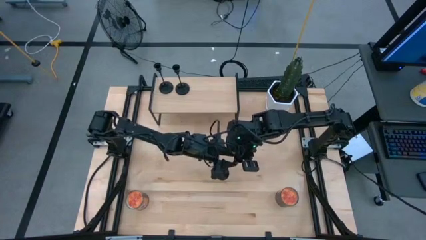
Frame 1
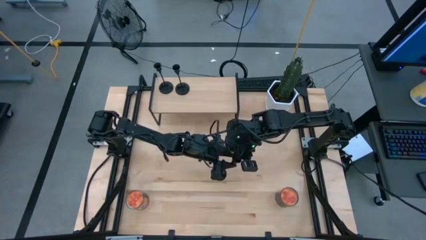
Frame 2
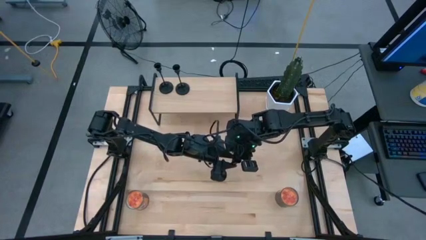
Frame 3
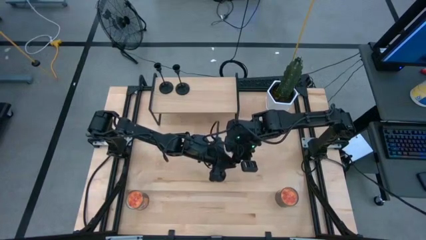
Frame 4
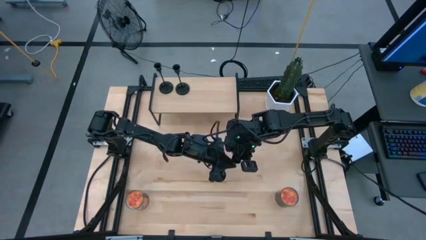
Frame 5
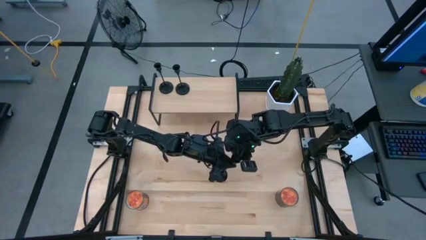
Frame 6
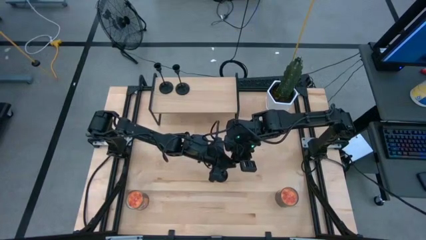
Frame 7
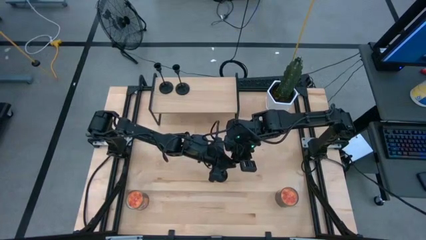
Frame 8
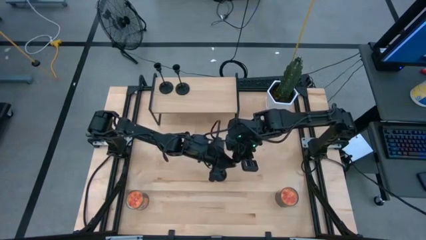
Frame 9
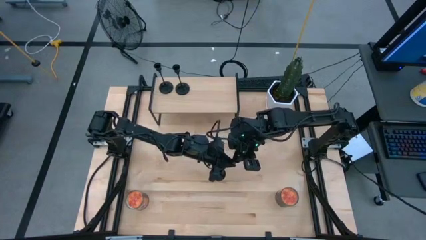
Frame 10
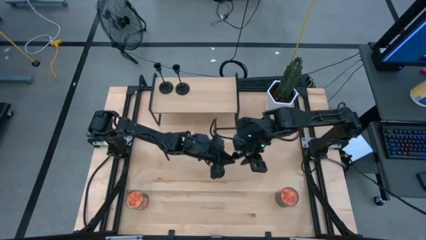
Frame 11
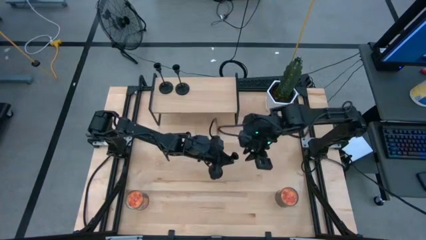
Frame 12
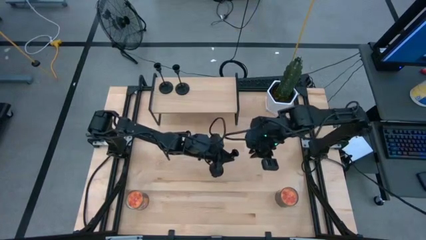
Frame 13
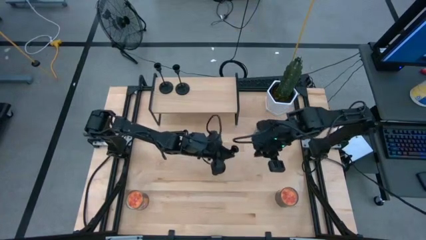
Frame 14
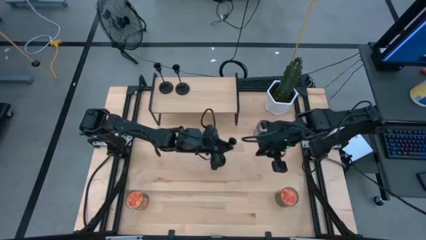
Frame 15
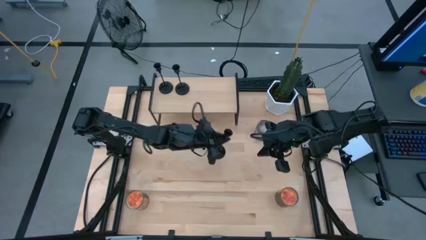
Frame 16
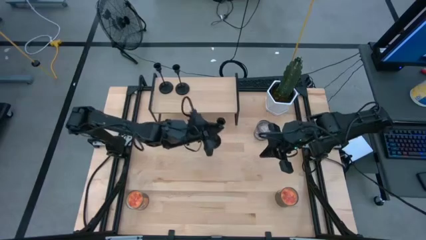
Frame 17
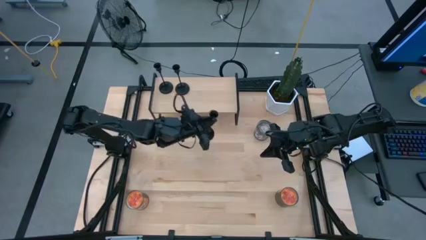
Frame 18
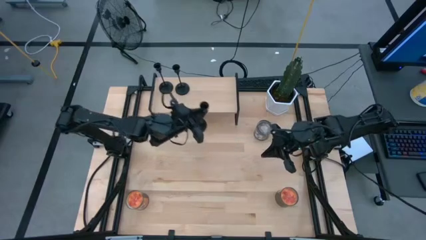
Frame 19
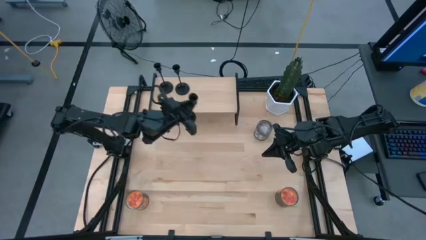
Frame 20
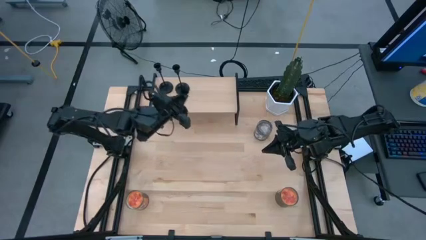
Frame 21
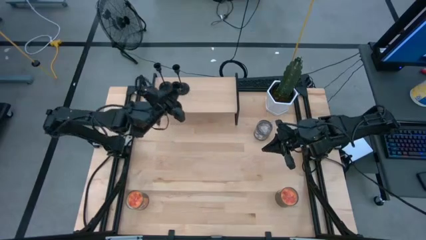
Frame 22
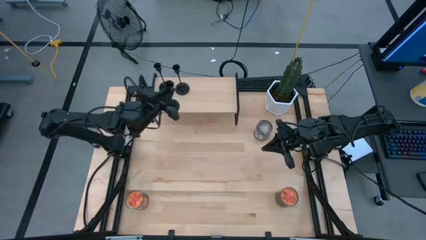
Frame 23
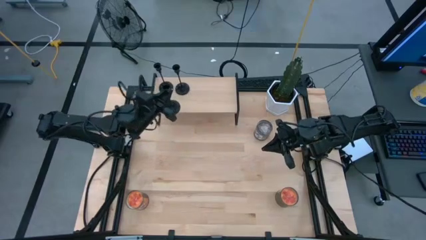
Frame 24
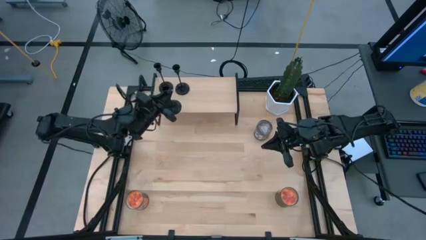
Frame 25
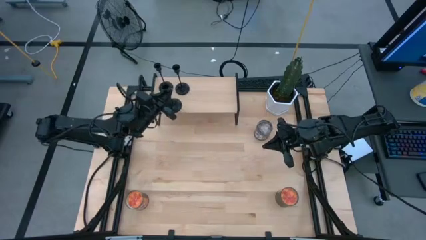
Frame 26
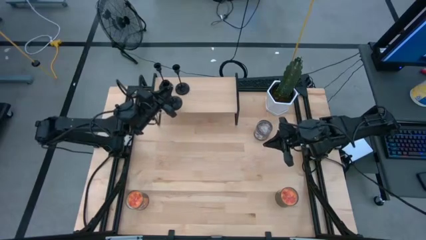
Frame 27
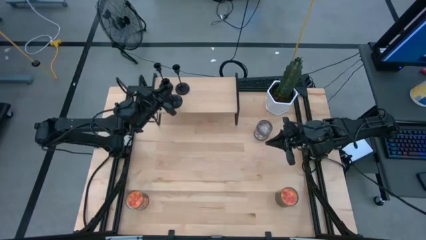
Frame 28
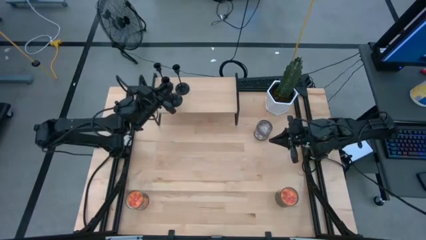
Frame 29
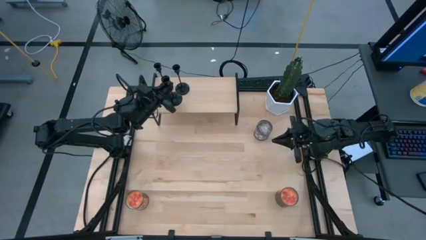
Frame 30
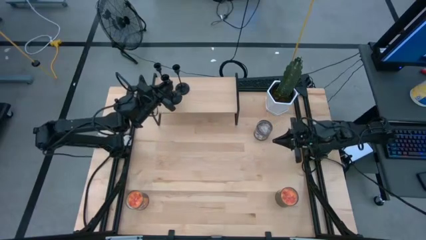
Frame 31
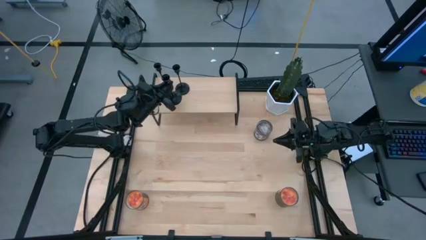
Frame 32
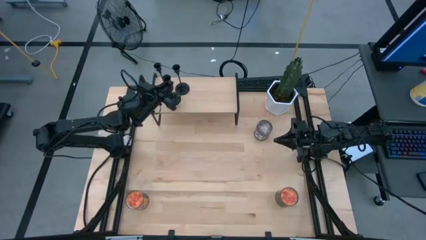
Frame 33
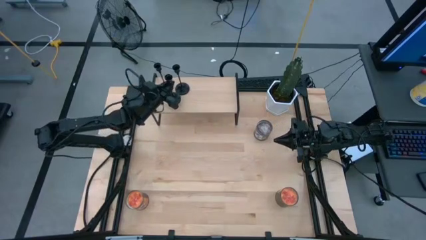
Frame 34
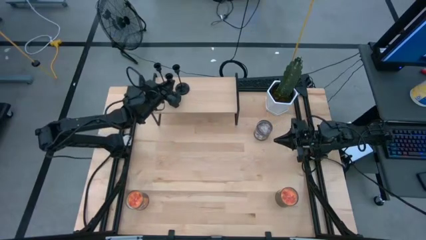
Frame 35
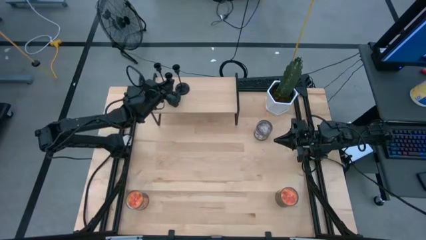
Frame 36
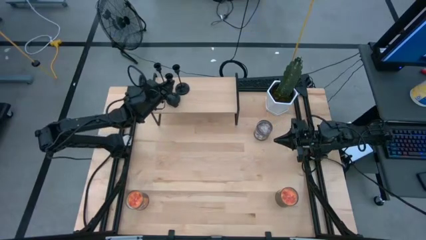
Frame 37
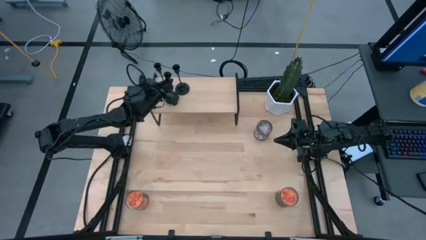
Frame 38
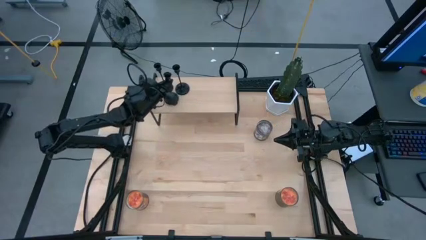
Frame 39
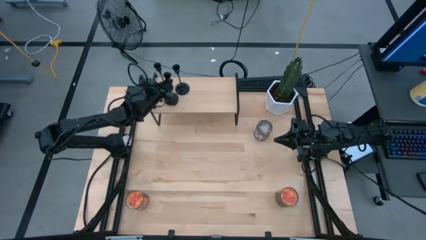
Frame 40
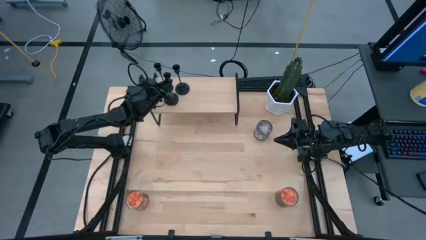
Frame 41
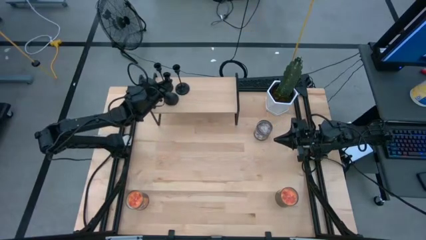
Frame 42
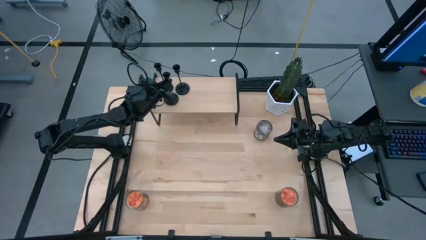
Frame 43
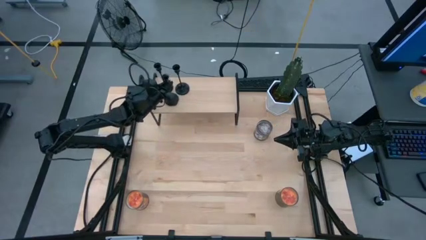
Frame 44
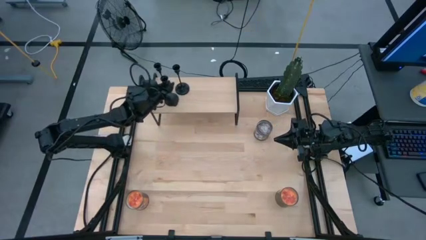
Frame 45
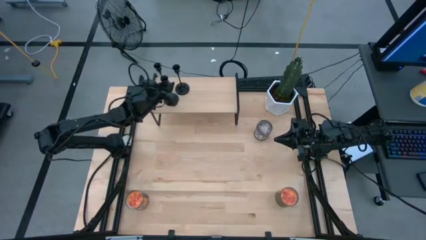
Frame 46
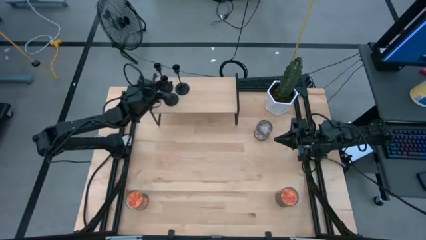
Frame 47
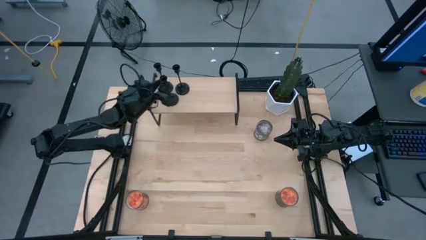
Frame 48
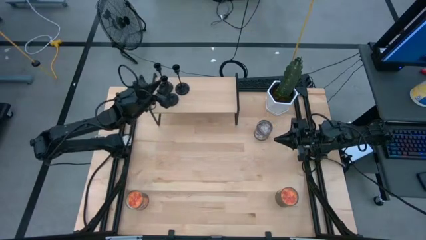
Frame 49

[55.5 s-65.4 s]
Task: Pick & Place candle stick holders
Put the black candle holder on the shelf

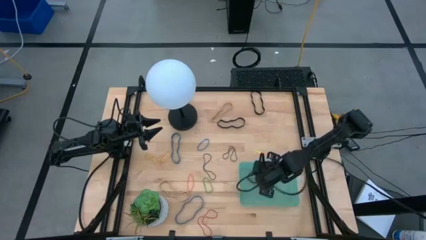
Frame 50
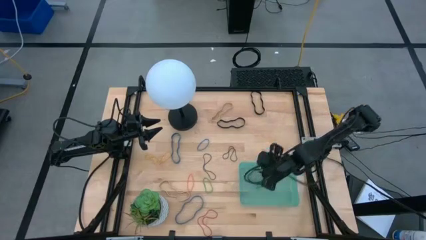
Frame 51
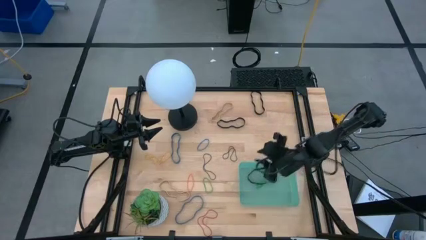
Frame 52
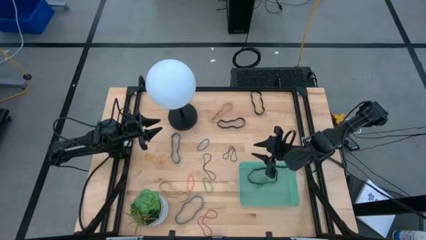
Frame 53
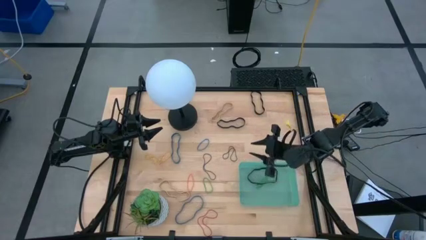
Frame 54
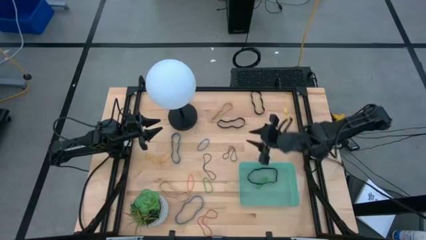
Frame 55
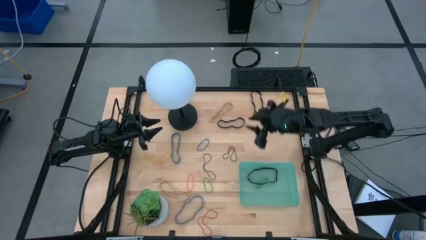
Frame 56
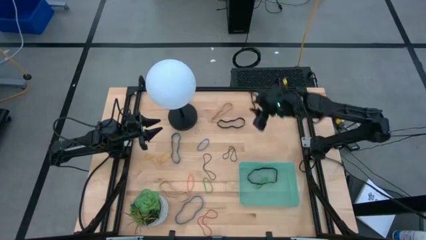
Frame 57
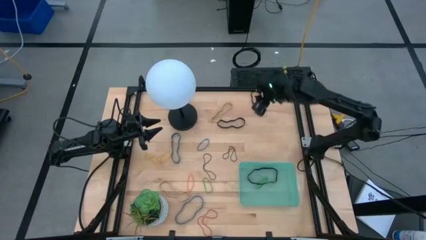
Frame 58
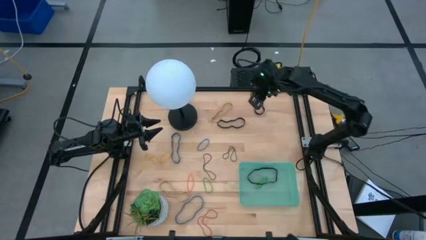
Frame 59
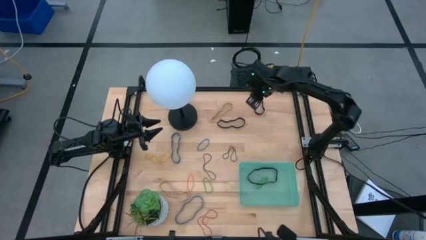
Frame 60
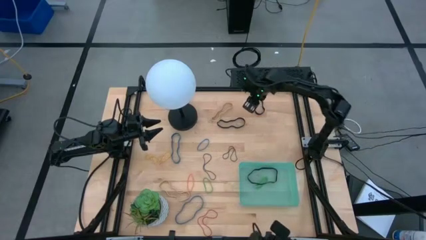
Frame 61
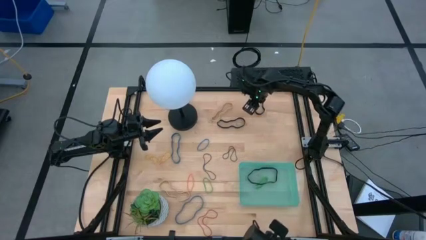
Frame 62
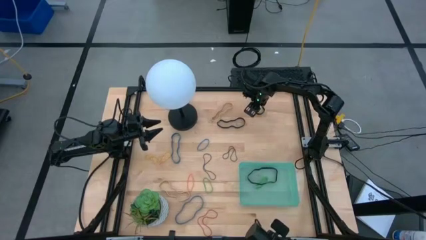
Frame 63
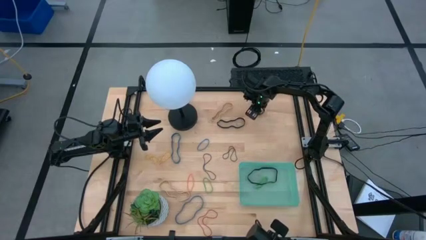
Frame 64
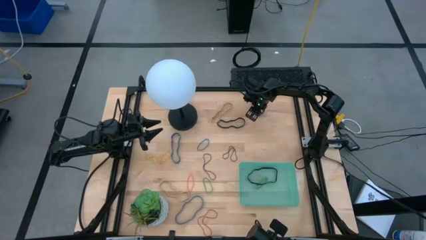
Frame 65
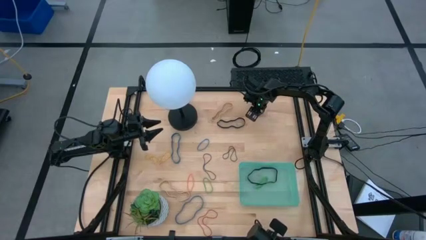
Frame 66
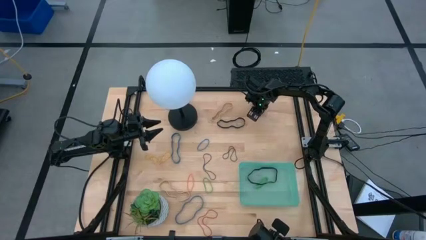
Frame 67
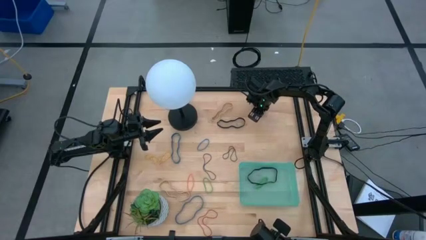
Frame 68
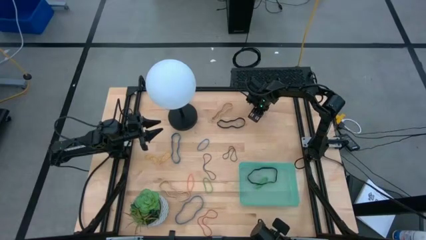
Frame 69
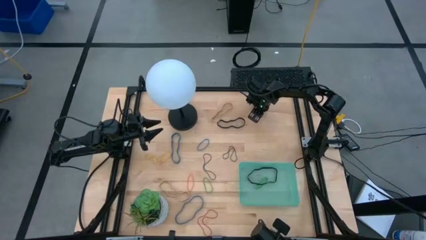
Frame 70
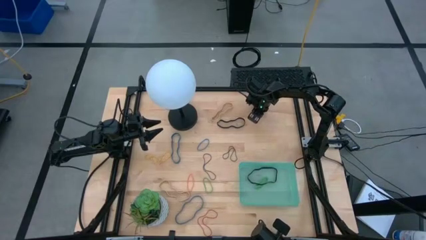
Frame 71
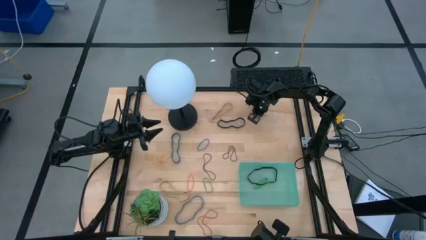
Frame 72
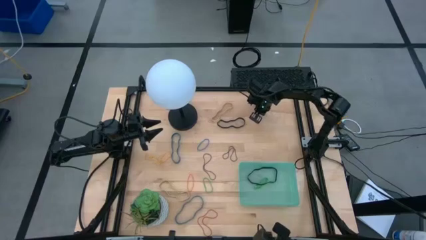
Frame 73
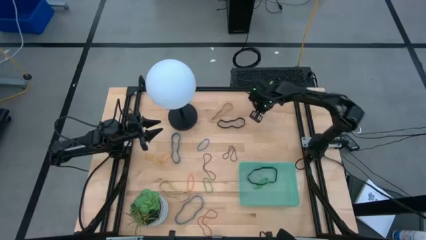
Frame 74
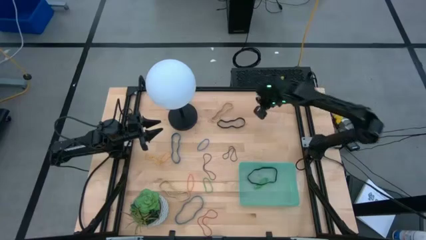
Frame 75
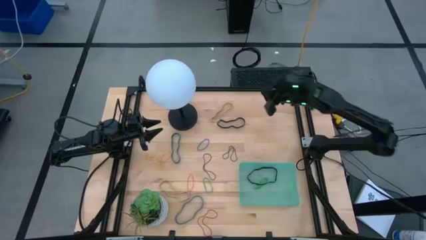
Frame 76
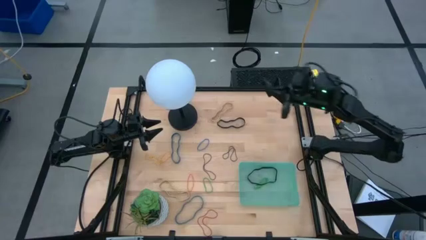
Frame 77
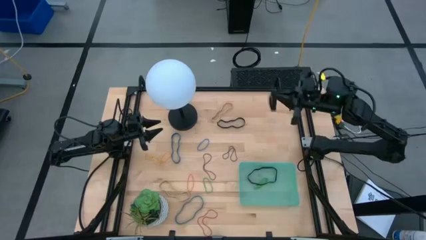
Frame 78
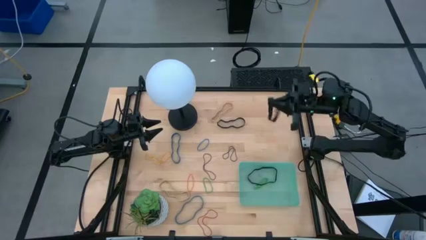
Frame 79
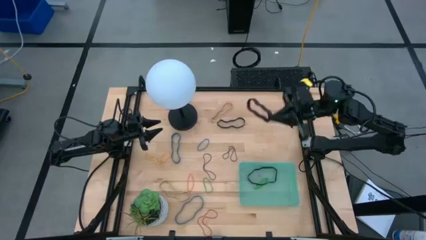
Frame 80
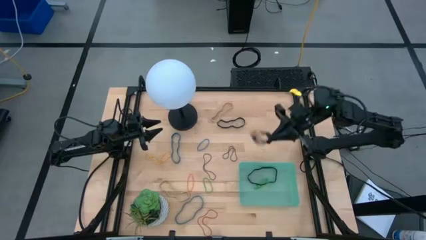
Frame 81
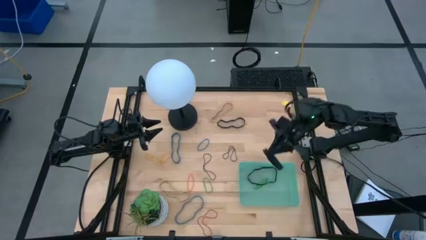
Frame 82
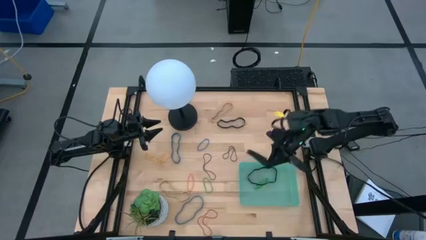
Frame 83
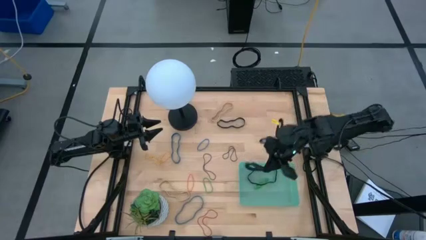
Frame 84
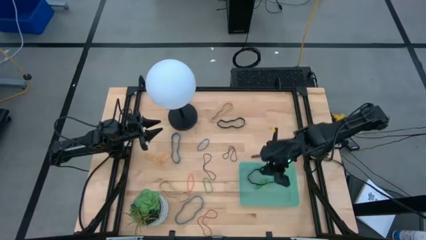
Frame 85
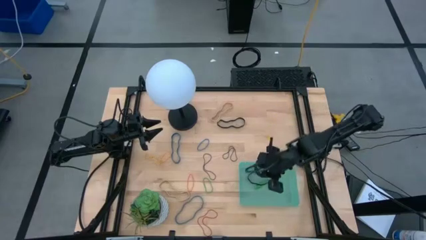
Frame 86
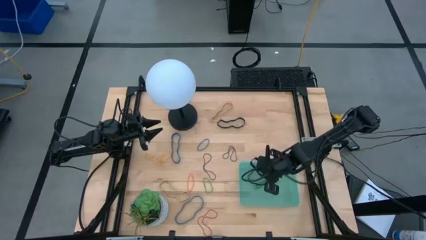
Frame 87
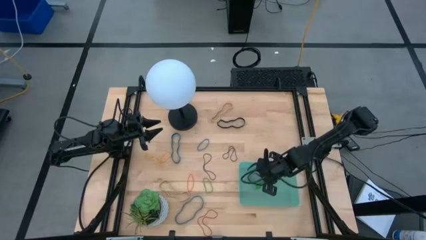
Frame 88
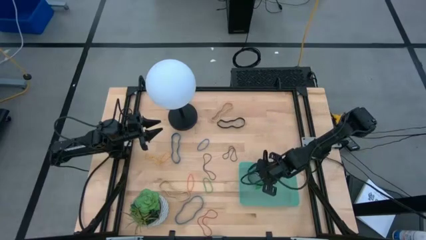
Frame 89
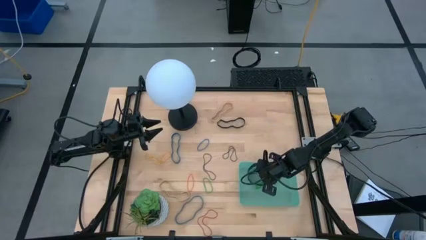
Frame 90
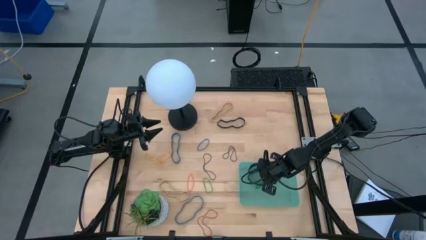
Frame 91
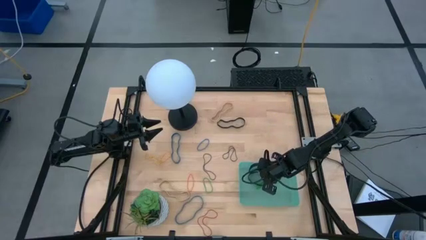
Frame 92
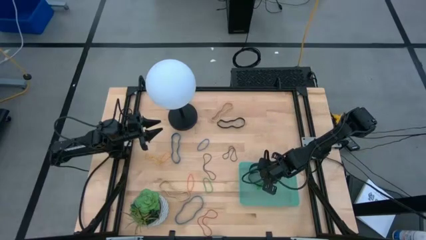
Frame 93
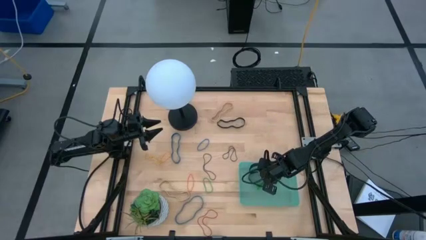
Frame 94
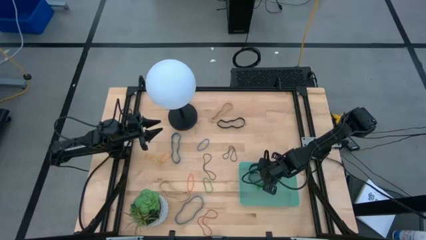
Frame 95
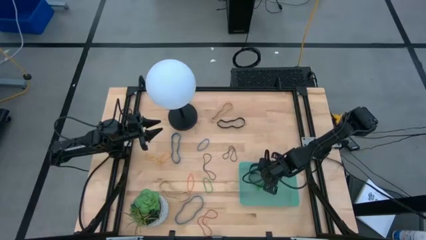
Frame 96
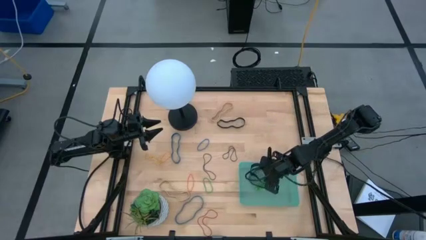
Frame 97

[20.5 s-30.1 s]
Task: Pick and place rubber bands into bin
Put the top black rubber band into the green bin
